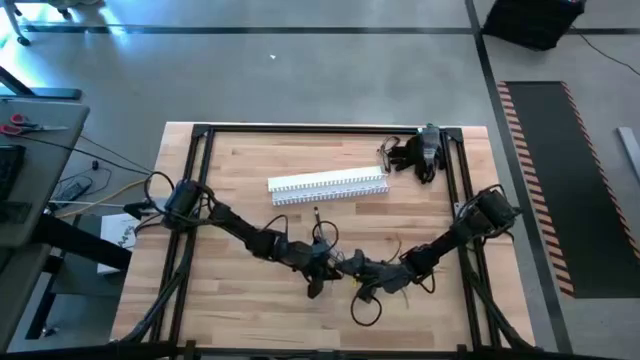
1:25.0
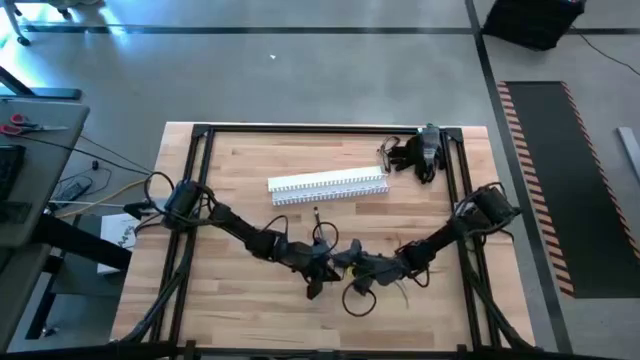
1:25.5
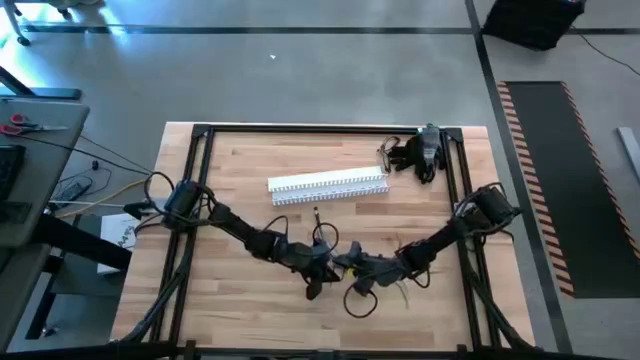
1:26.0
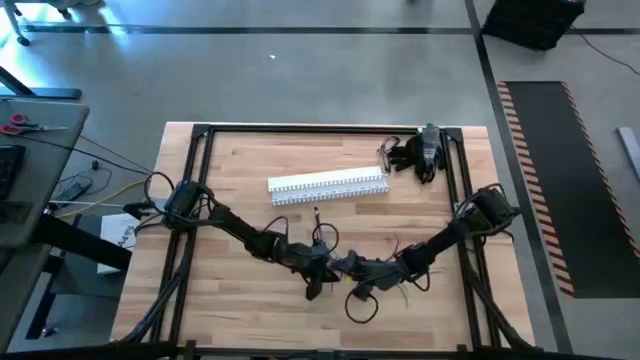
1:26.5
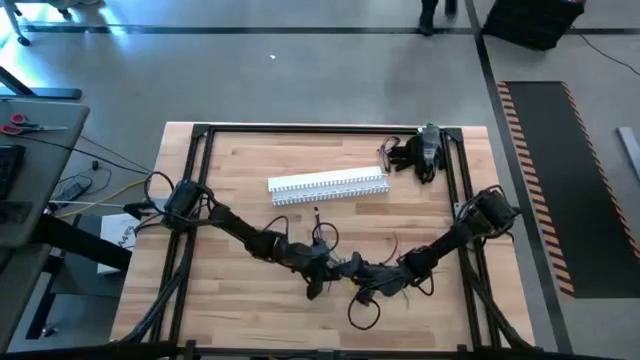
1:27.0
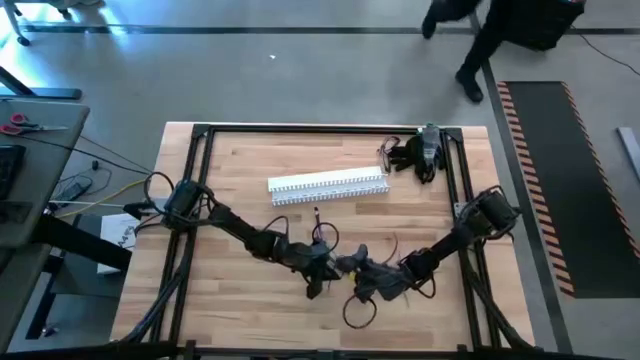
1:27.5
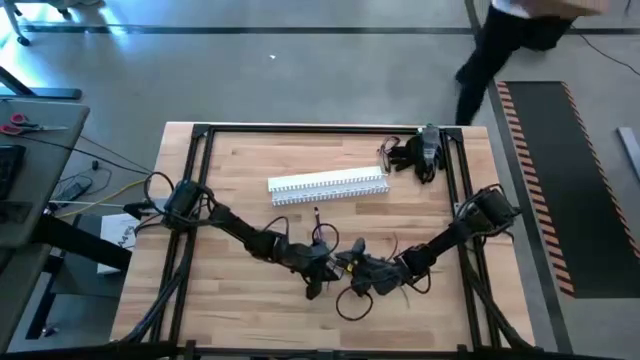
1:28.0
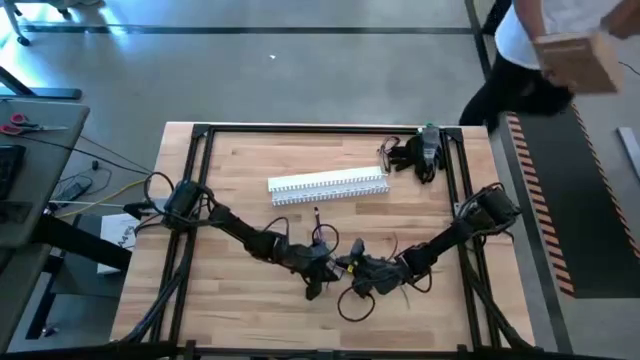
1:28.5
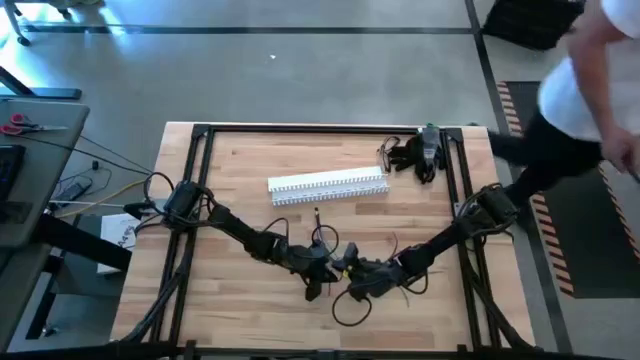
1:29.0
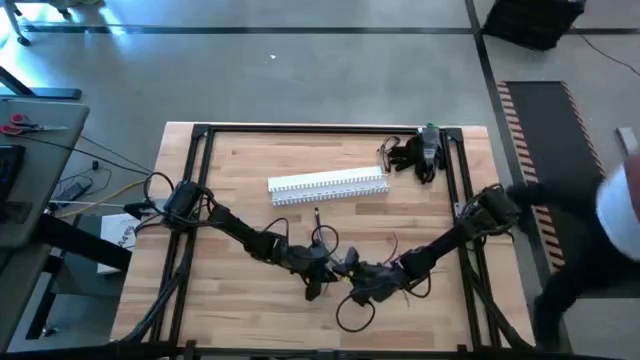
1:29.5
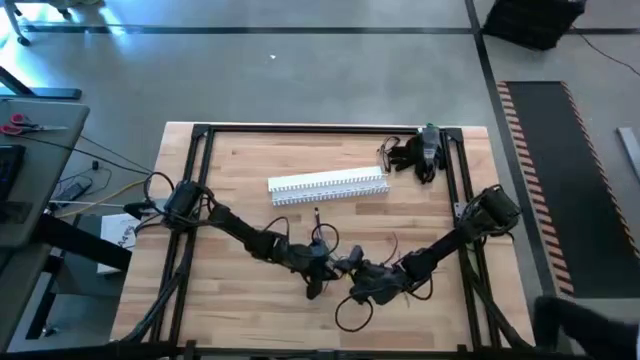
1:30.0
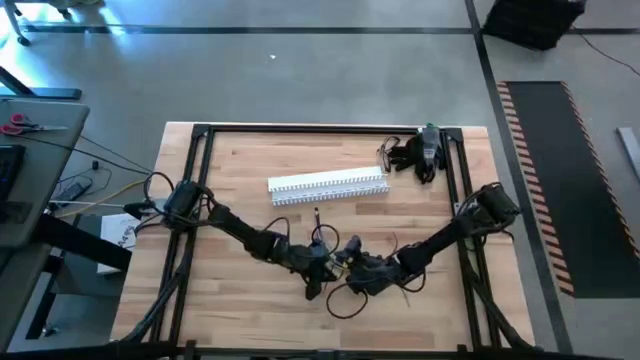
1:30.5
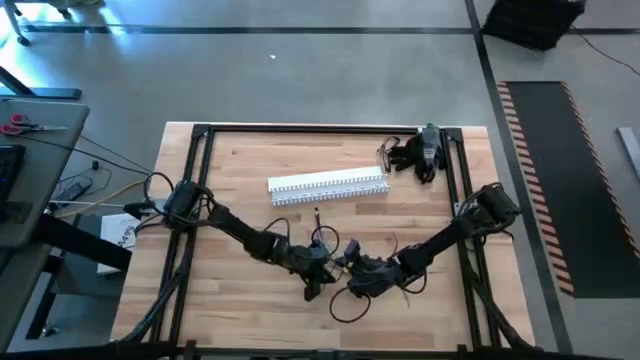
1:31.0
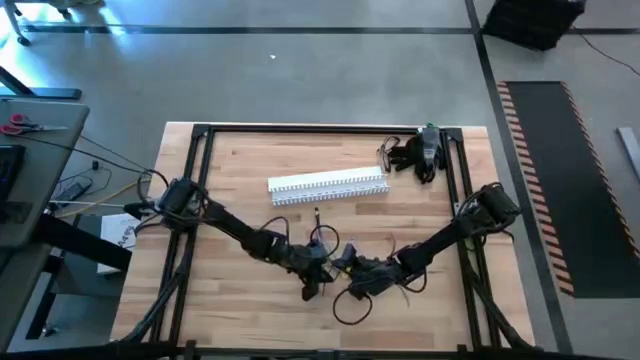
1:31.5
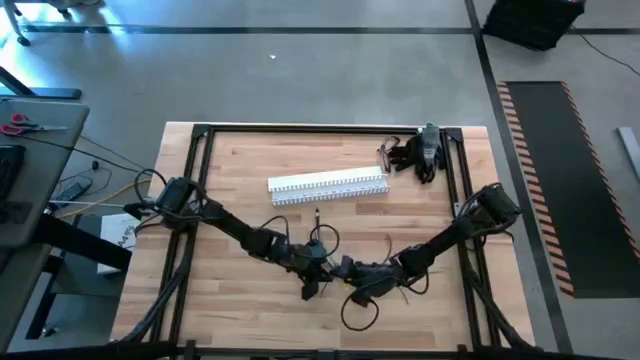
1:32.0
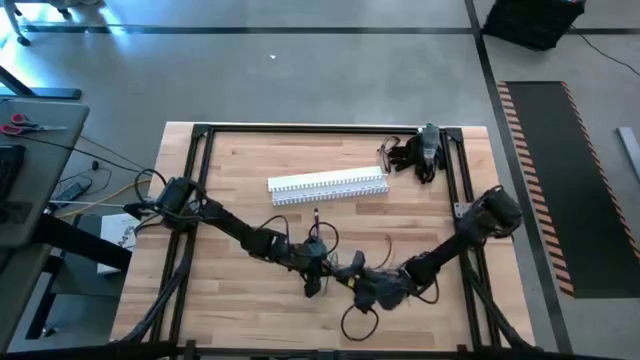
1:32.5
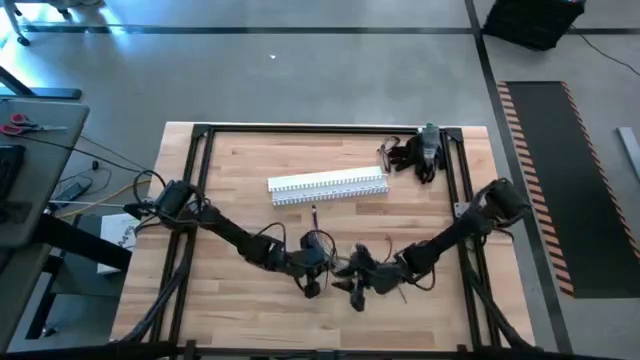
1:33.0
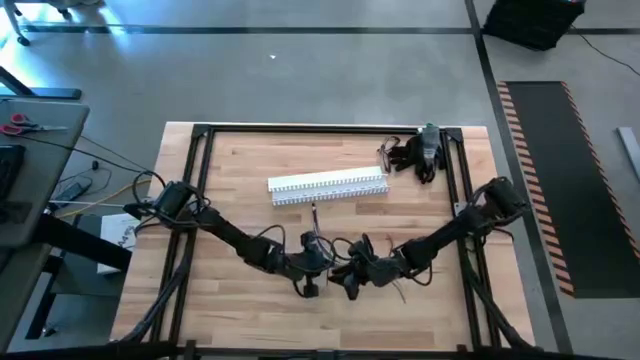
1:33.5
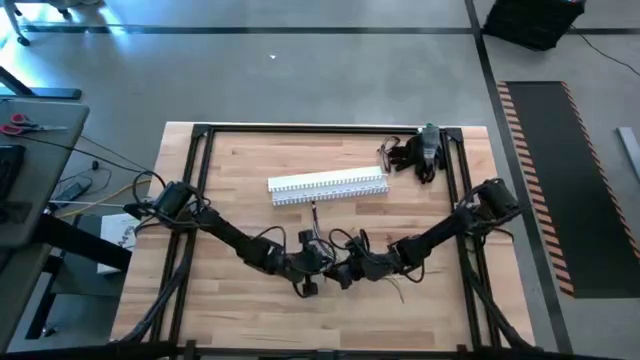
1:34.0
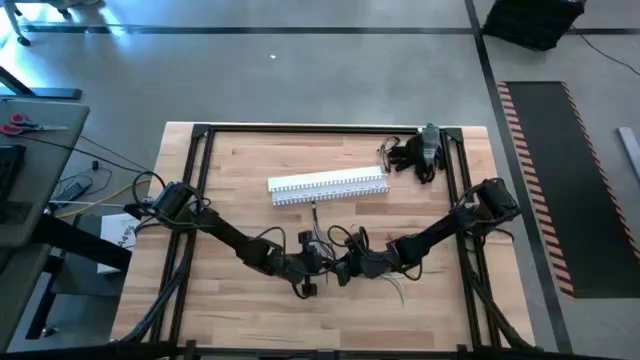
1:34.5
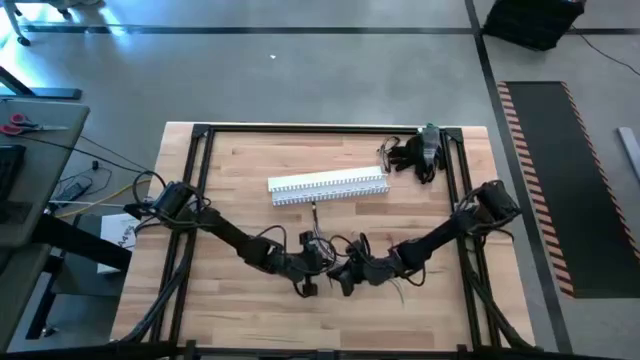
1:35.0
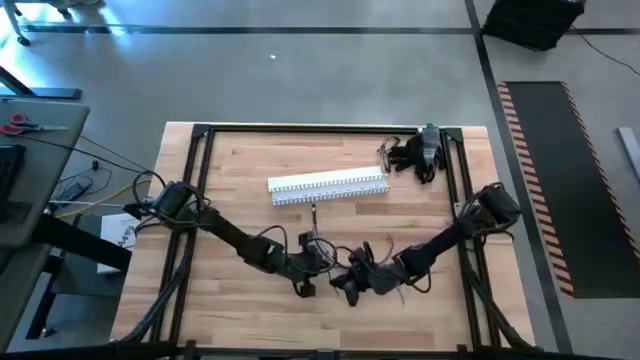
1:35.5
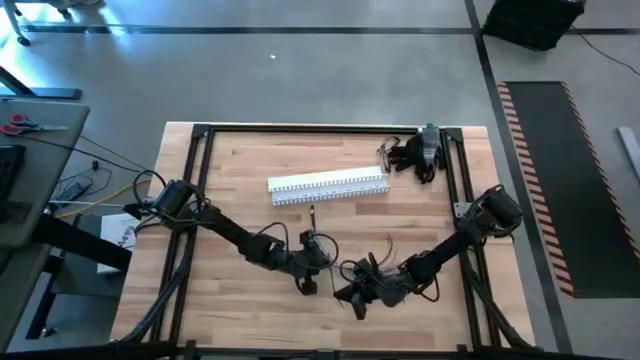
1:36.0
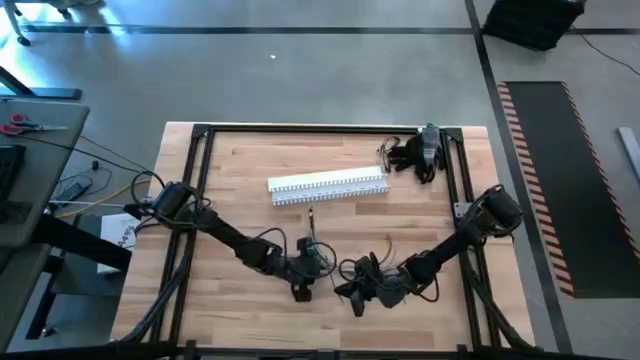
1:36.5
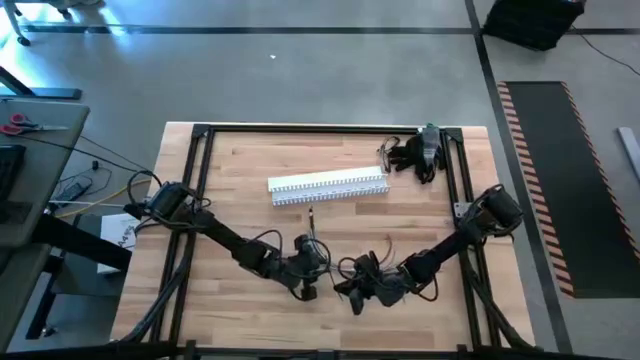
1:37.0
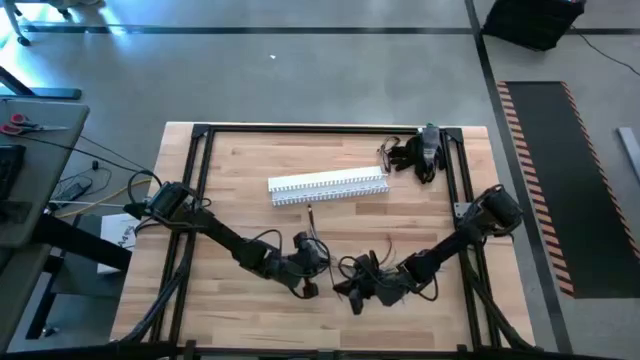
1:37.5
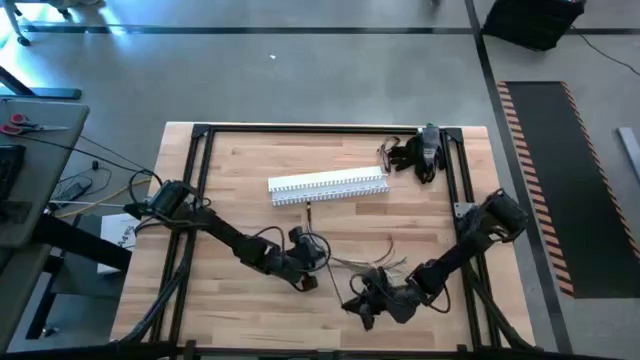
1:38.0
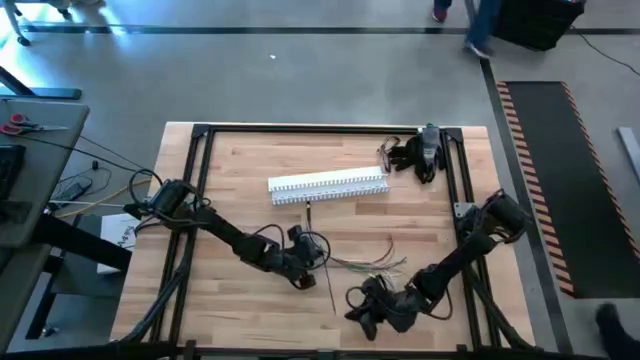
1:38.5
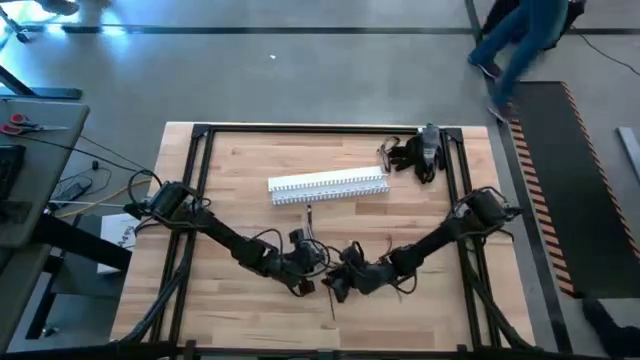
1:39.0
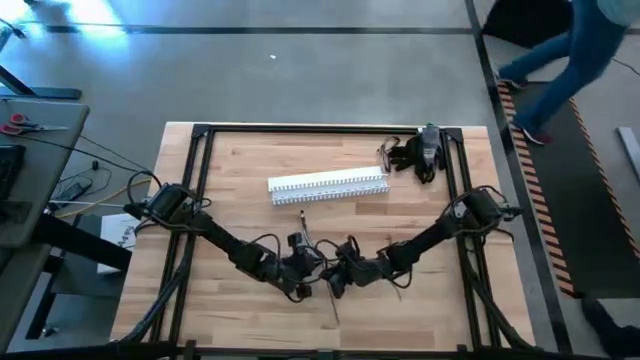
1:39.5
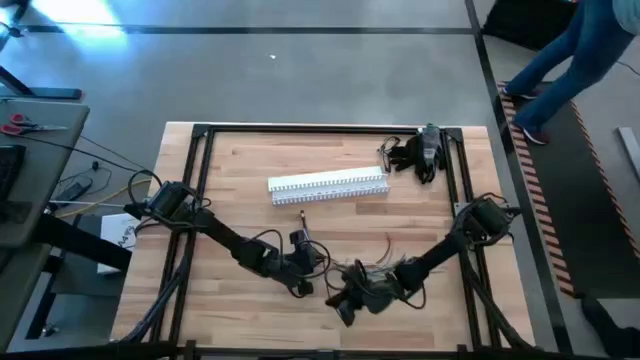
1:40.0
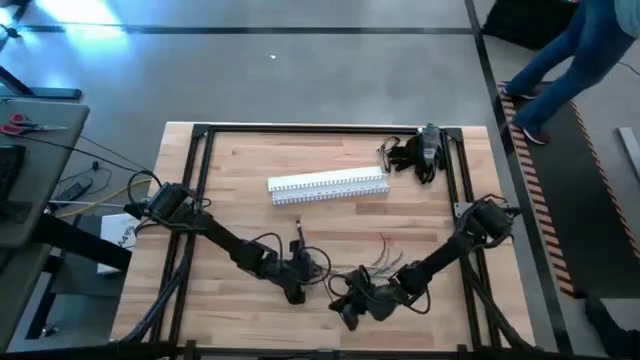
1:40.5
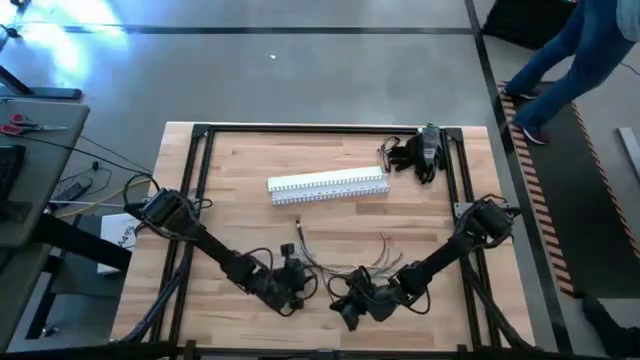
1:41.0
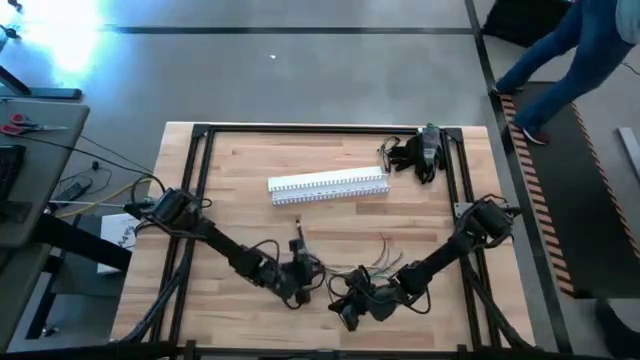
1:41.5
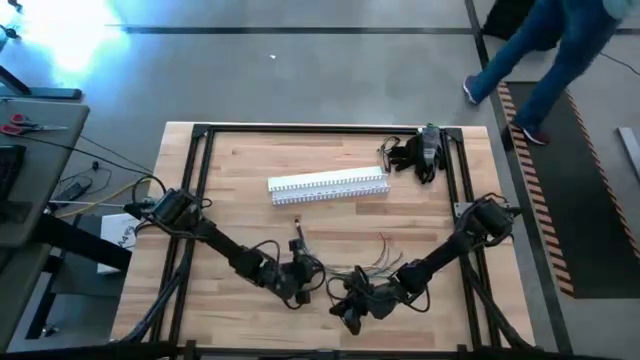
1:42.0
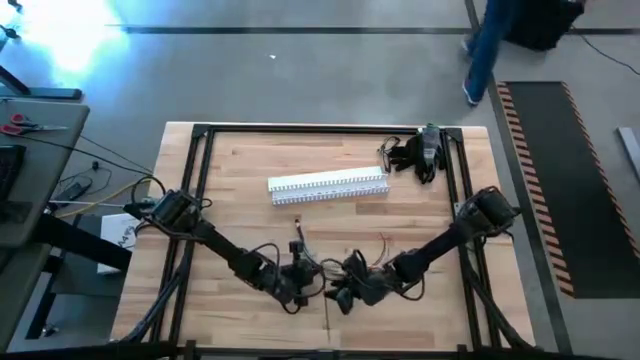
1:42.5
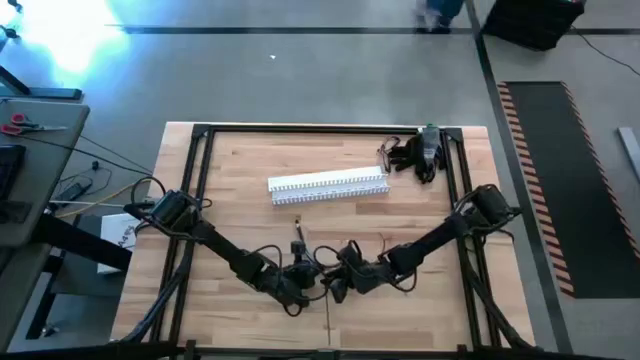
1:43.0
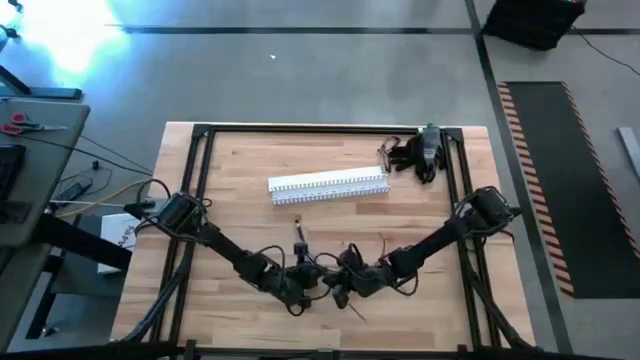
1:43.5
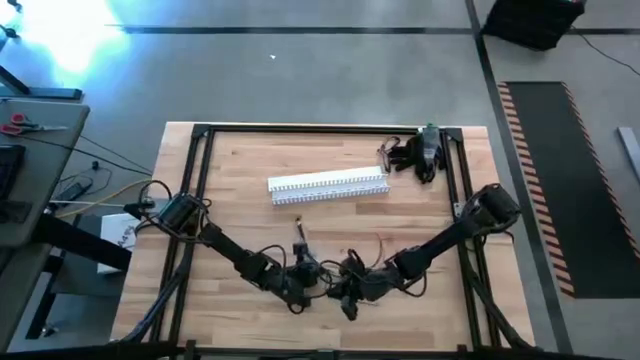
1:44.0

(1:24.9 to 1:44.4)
Task: Ziptie cables
Wrap the cable wires with black ziptie

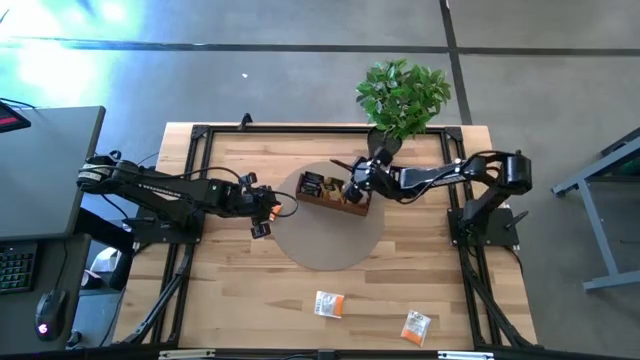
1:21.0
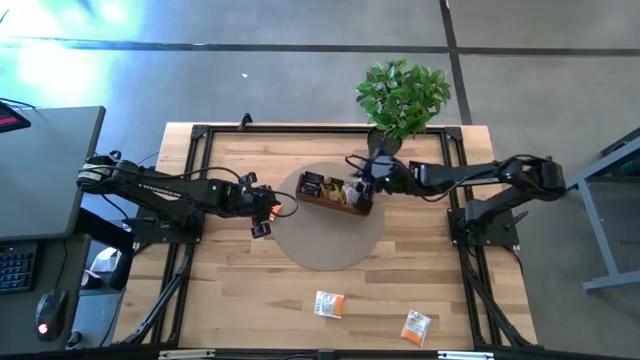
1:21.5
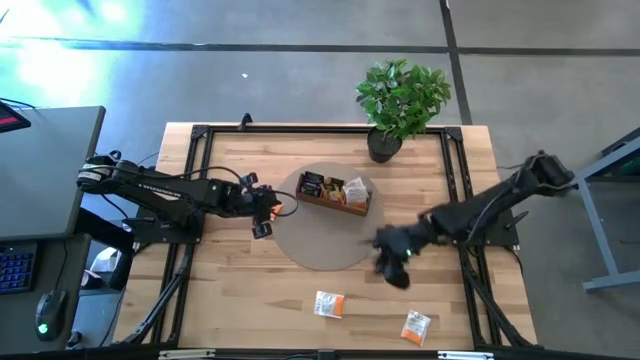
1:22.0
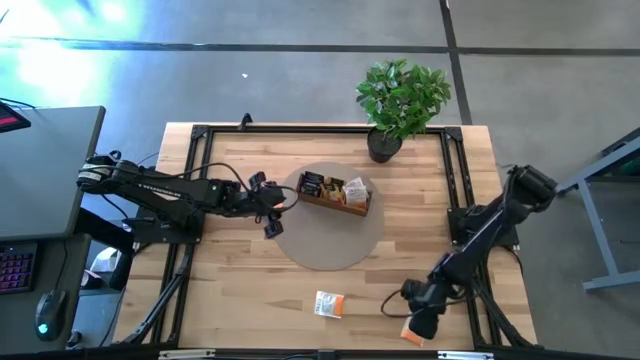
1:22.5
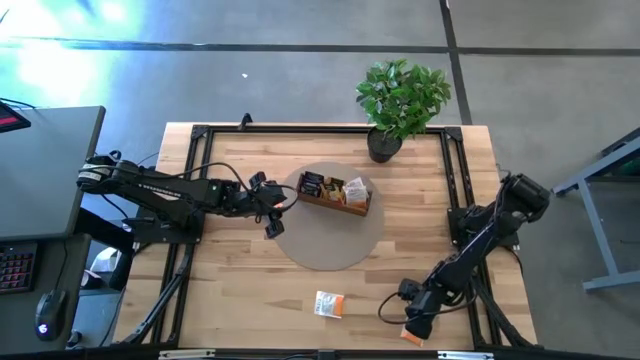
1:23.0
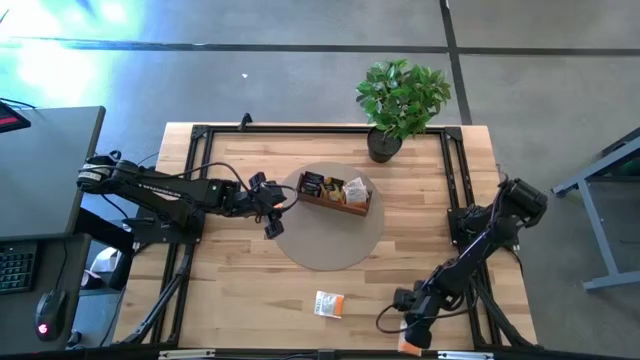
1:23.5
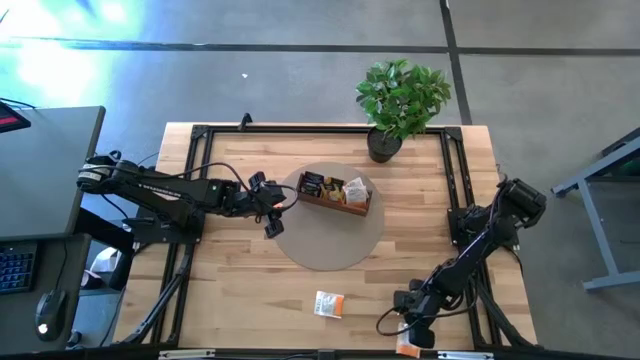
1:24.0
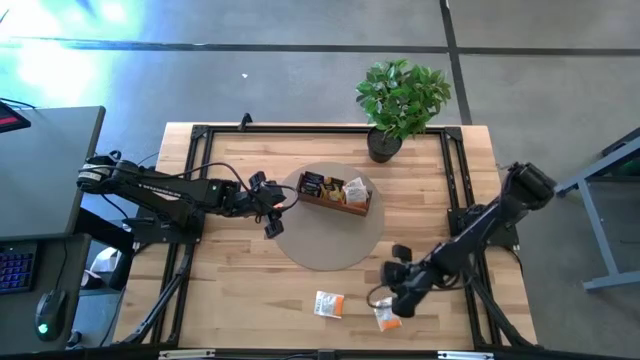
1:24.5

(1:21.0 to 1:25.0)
Task: Pick & Place Tea
Put the white tea bag into the right side area of the wooden organizer
